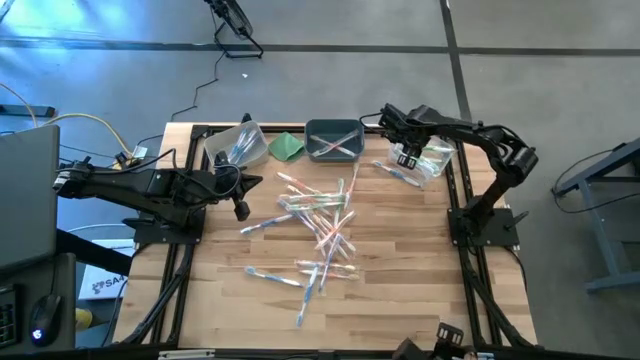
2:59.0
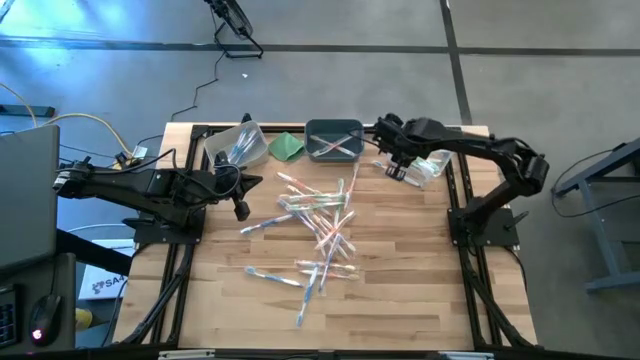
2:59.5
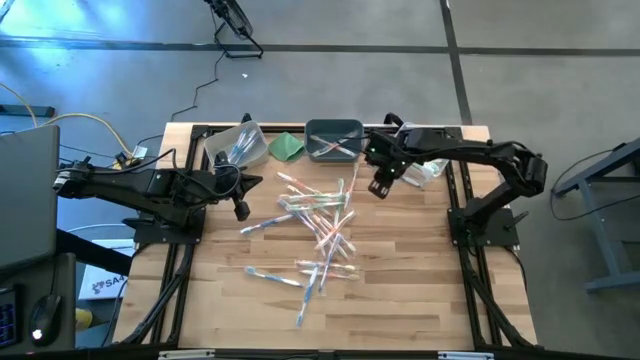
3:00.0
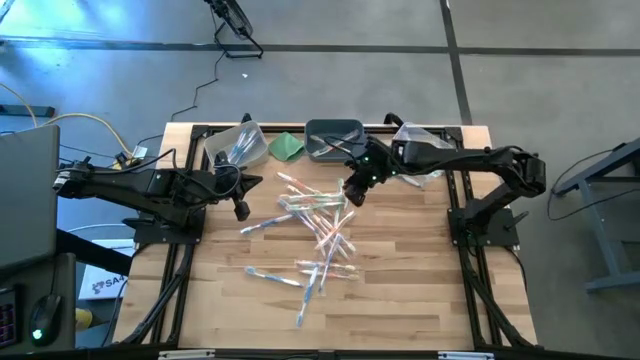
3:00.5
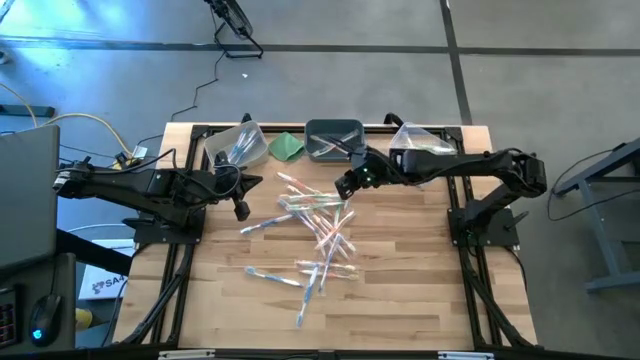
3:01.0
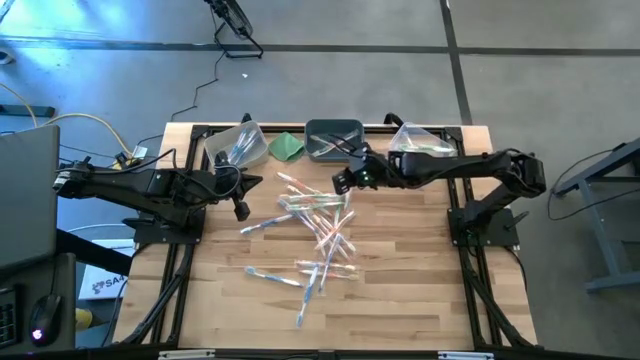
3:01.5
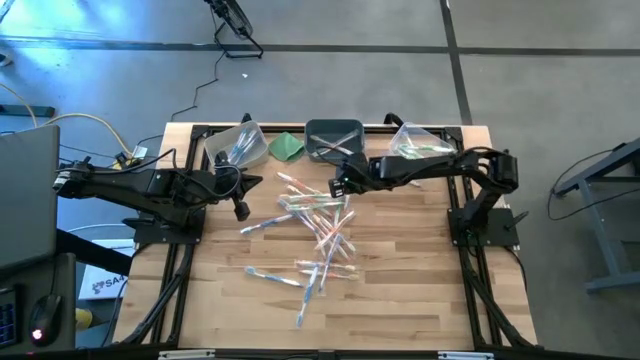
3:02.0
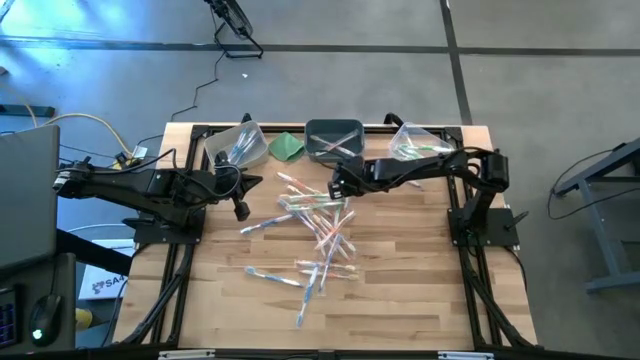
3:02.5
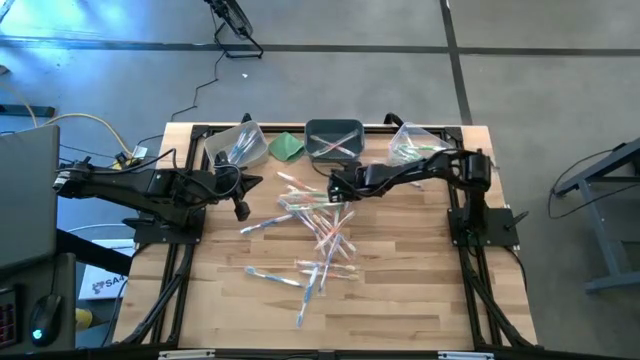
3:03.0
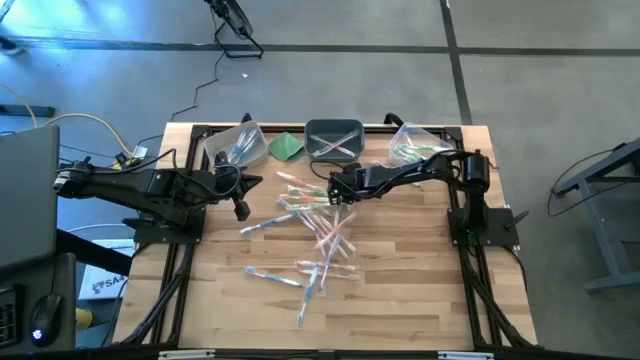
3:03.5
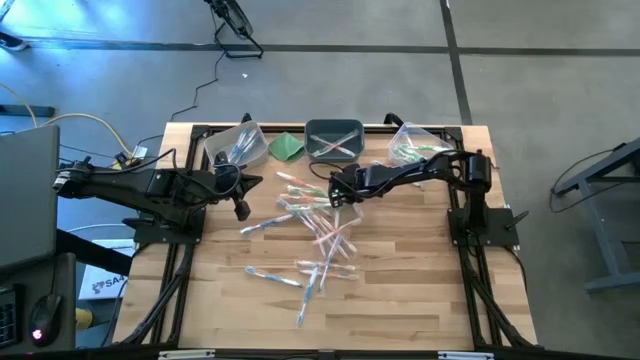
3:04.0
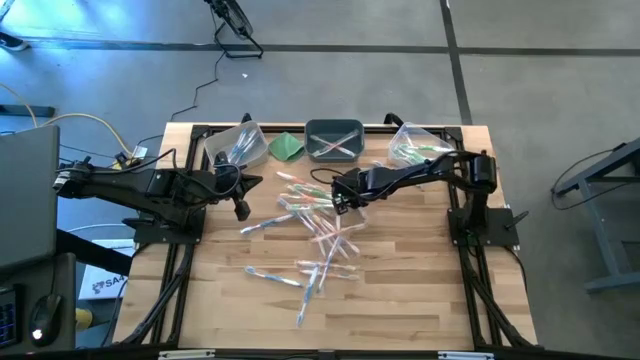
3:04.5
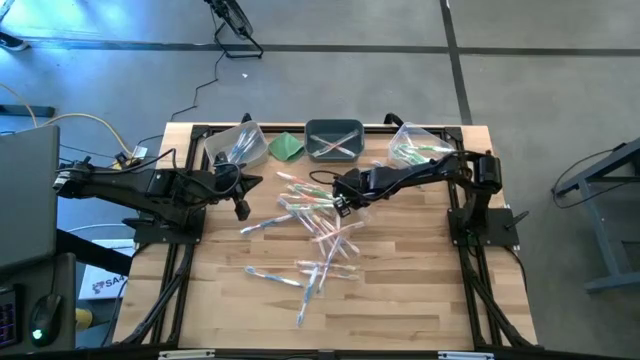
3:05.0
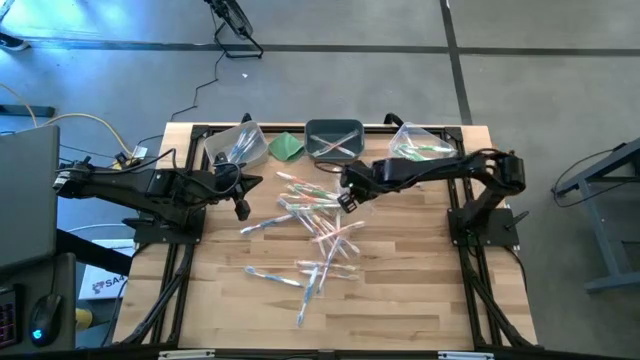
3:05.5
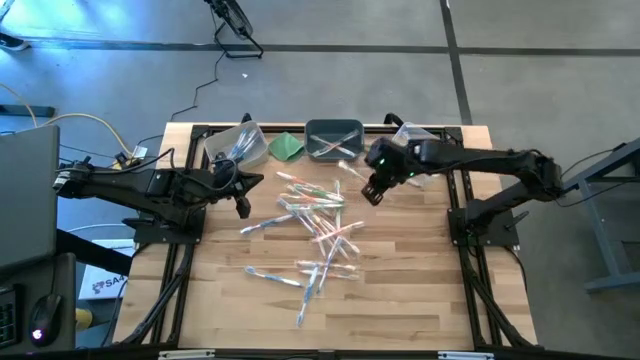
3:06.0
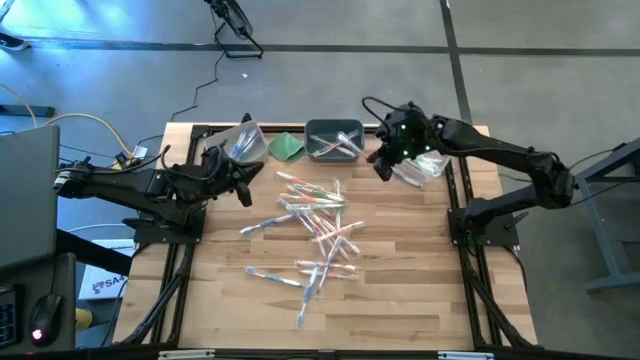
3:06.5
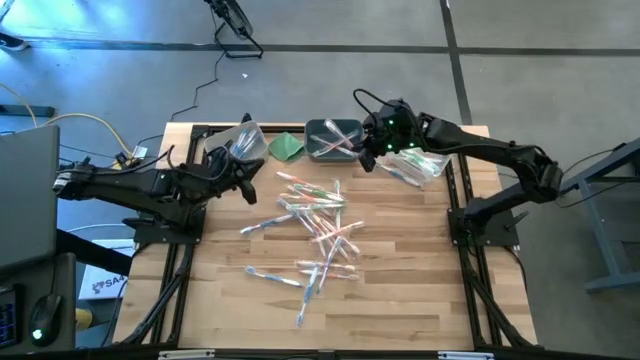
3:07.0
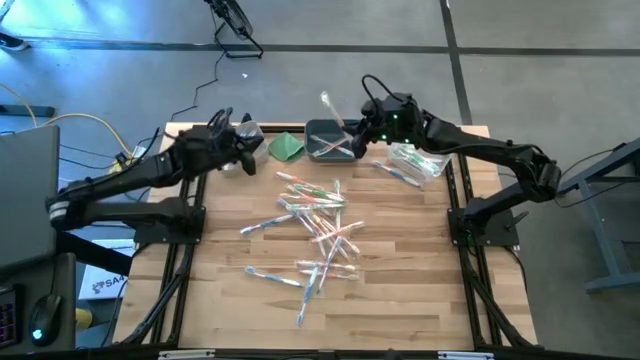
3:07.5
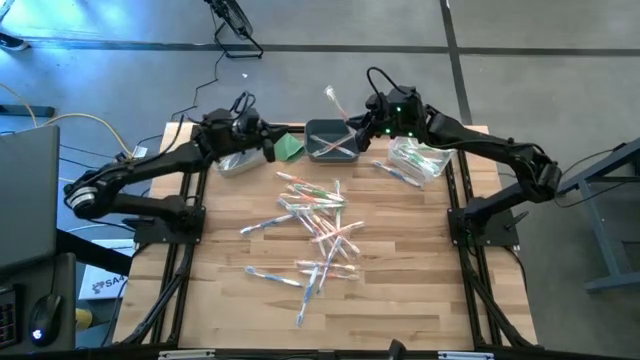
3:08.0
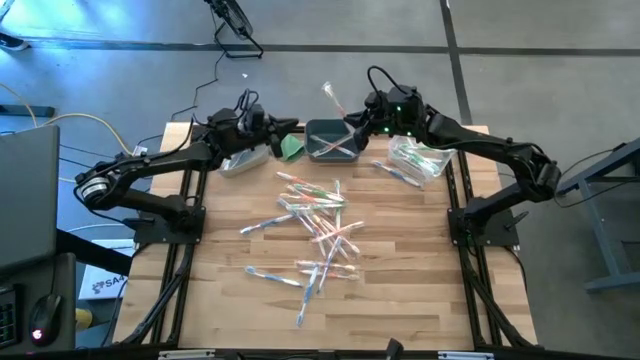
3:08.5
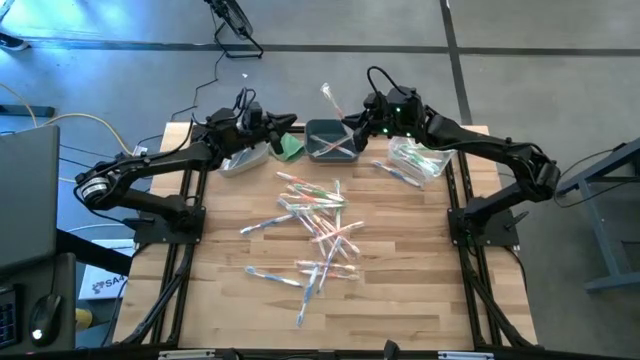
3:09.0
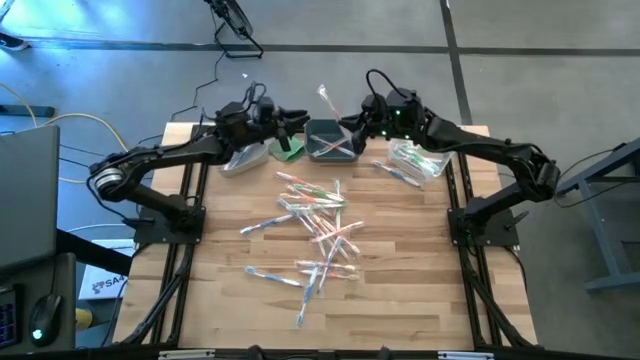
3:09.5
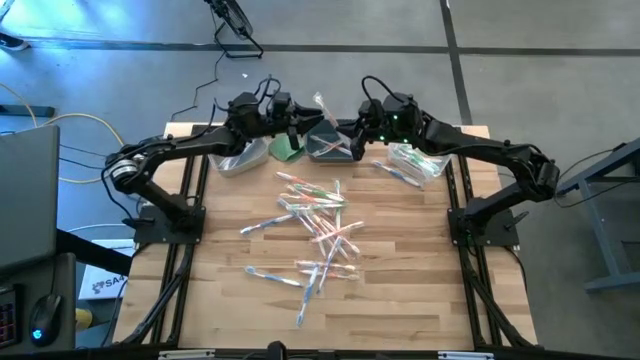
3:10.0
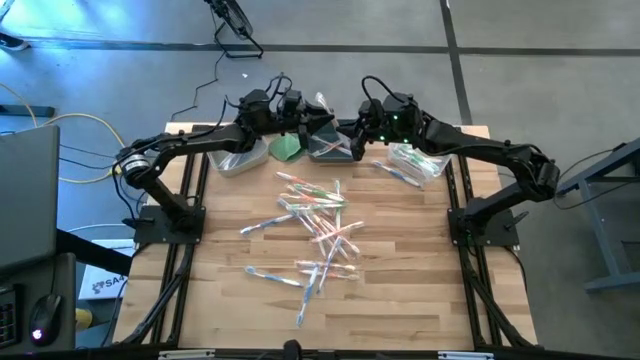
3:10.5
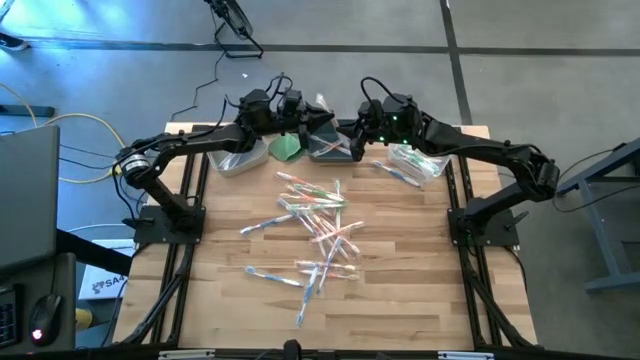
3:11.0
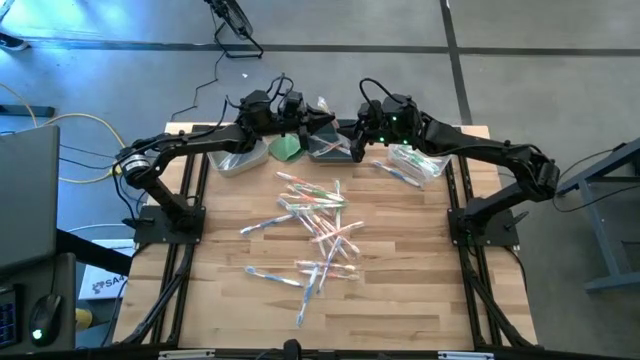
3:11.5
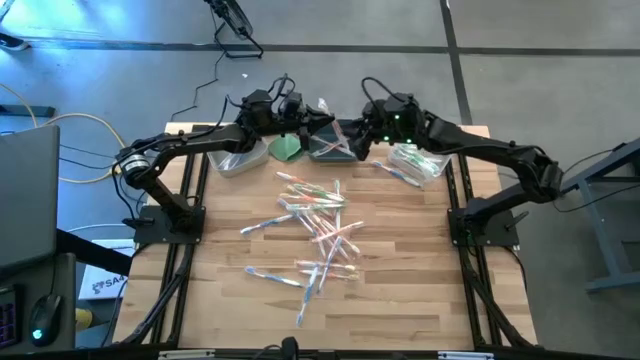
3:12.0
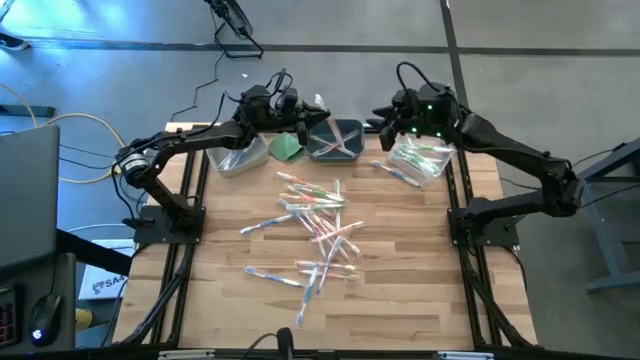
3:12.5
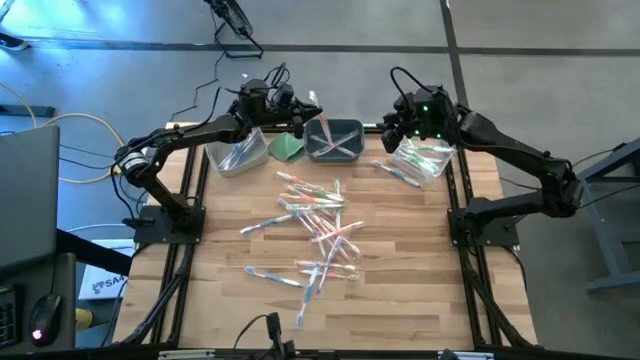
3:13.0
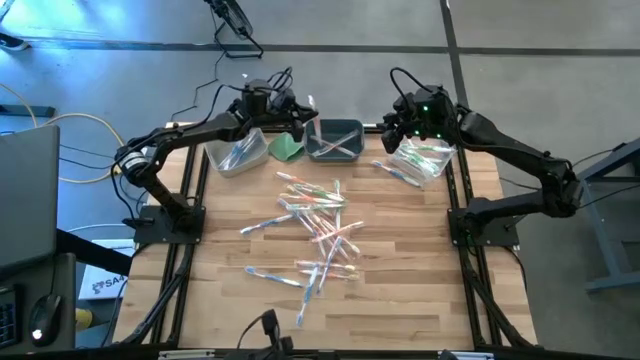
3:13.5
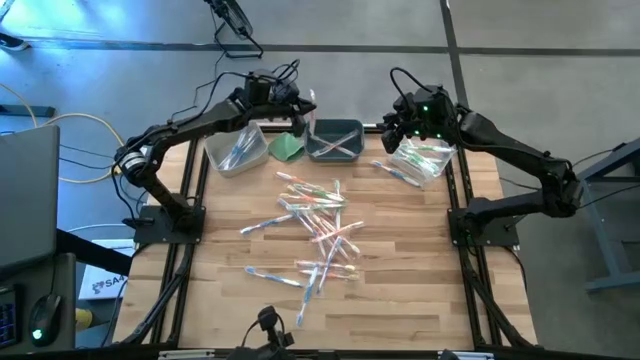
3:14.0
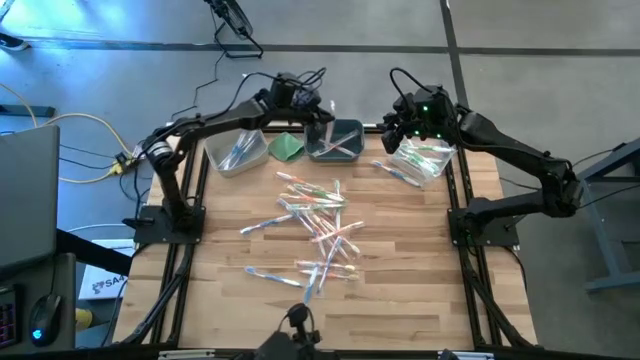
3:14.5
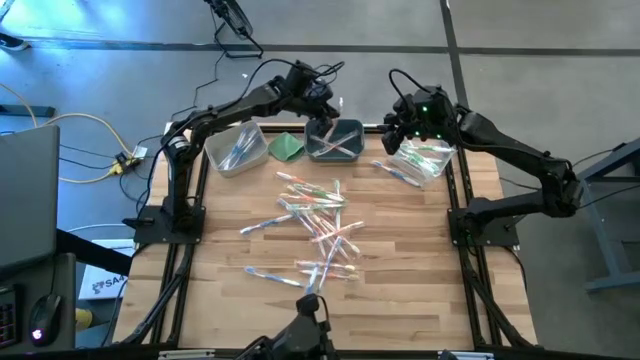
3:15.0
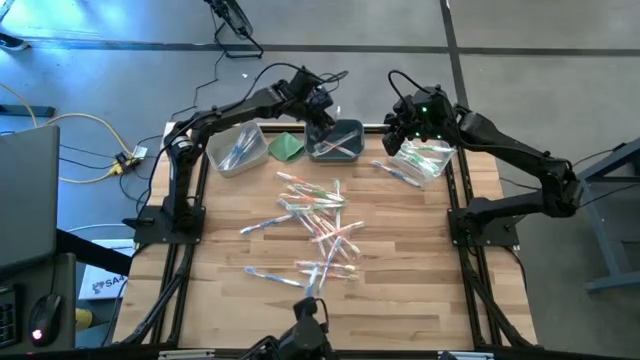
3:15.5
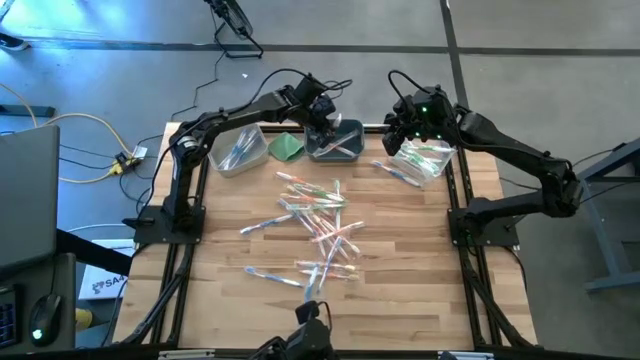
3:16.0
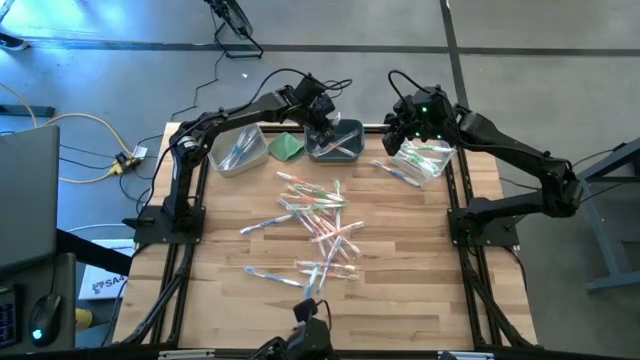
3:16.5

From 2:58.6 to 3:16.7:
Task: Pick & Place Toothbrushes
Put the orange toothbrush into the blue bin
